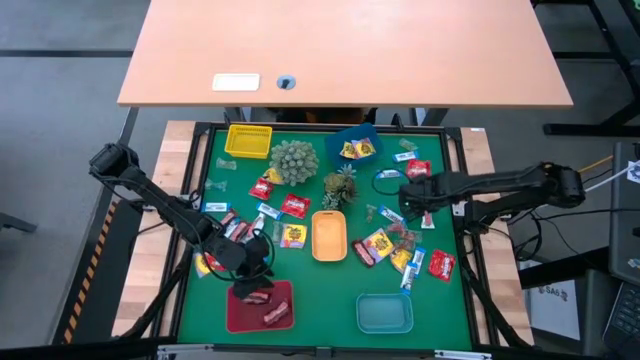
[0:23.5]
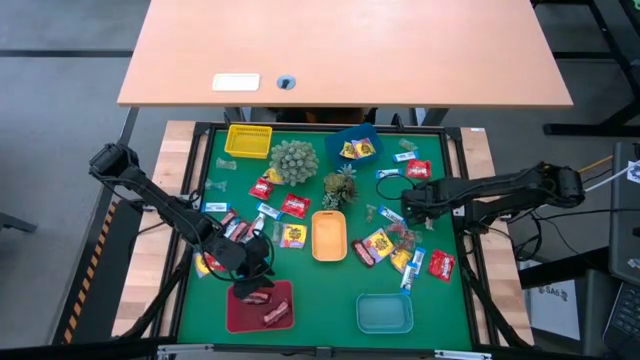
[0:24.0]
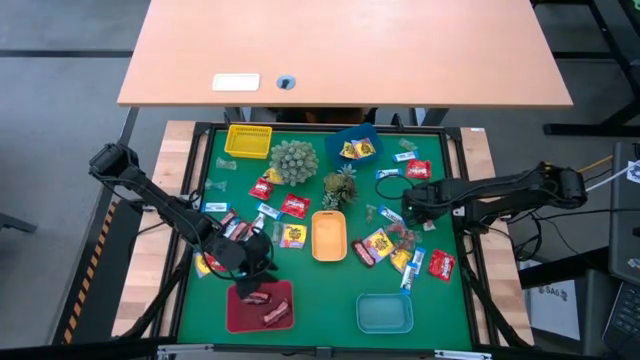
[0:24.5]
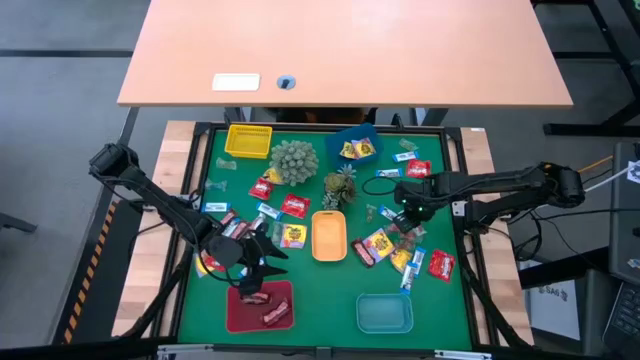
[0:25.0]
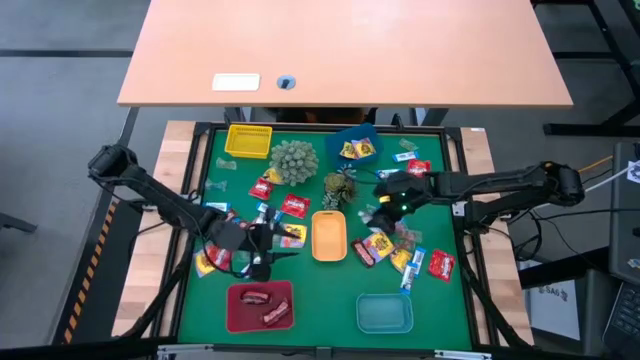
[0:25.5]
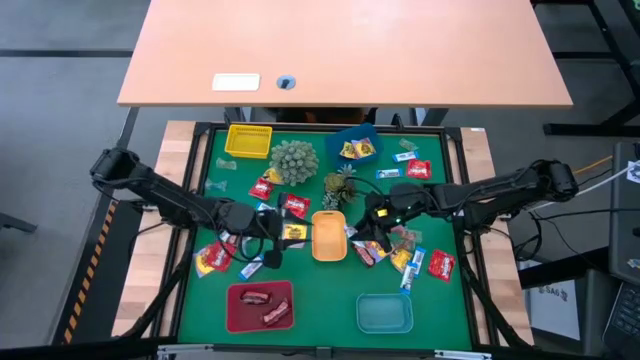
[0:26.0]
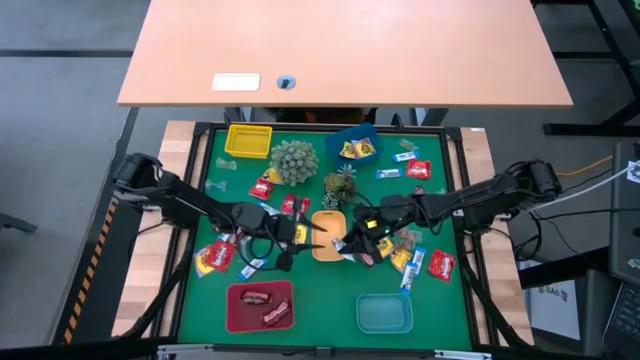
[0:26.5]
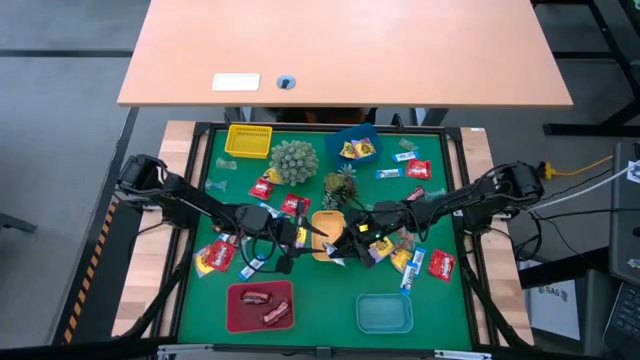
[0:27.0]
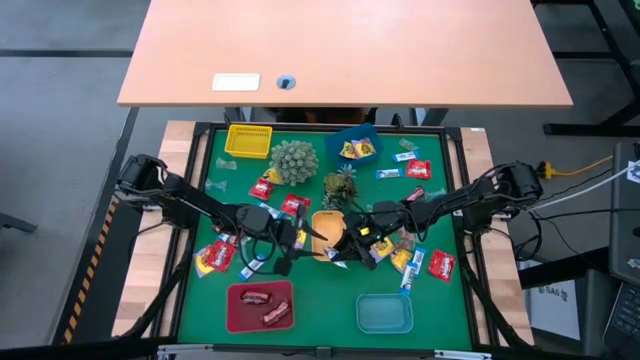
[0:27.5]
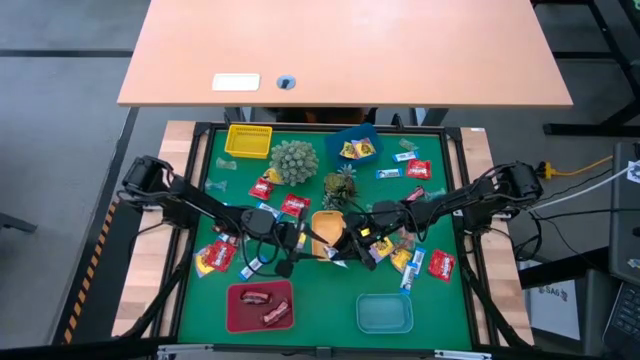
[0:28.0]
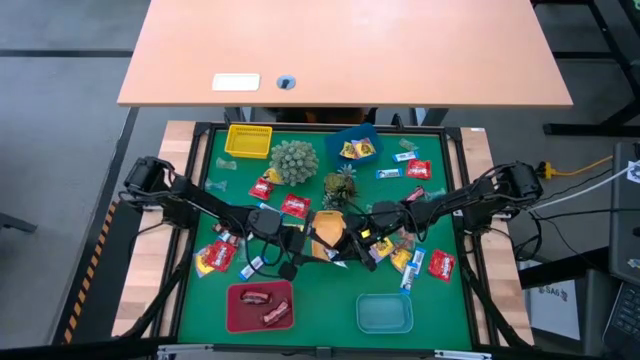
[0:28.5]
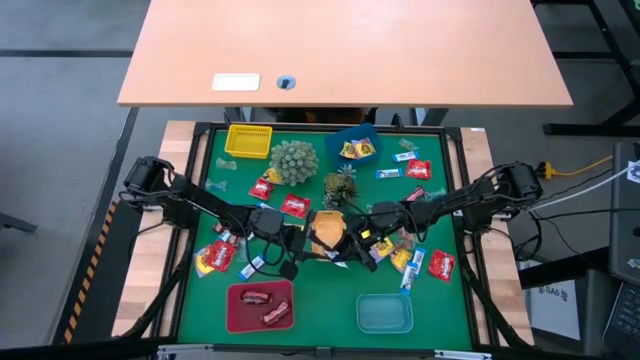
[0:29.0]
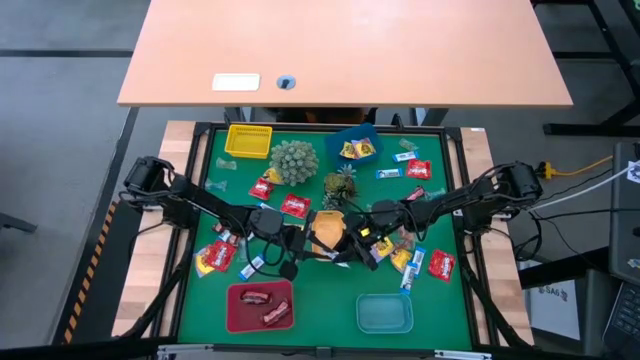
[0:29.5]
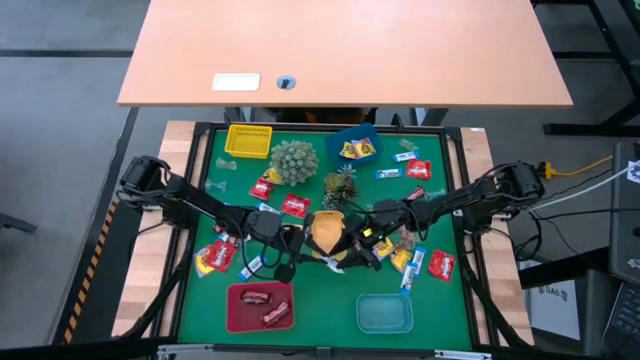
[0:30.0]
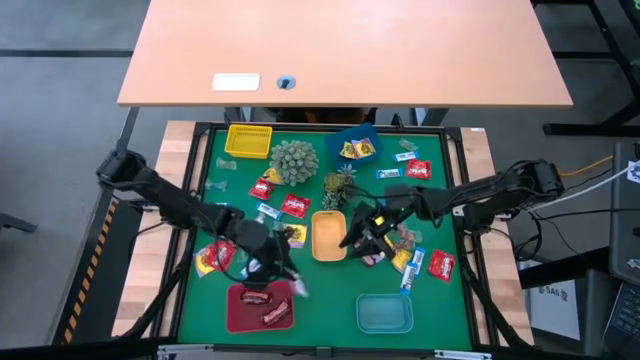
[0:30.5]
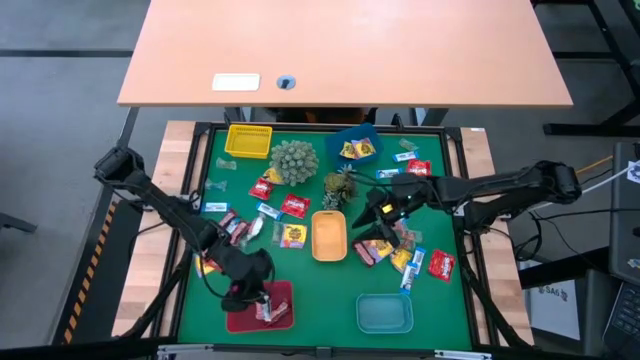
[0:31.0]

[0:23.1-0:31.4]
Task: Sort candy
Put the white chocolate bar into the red bin

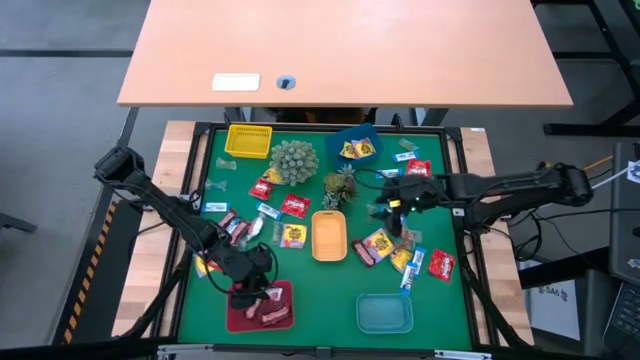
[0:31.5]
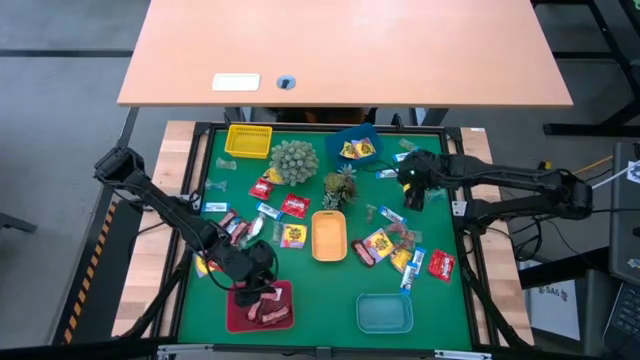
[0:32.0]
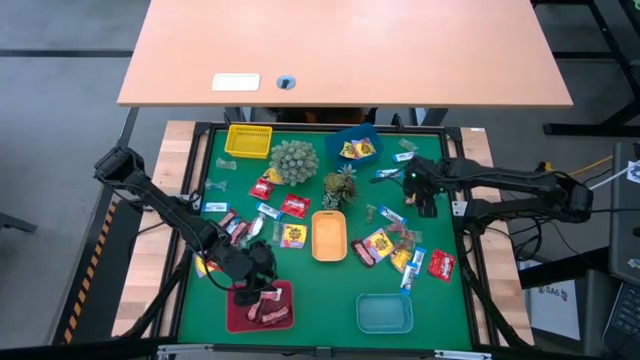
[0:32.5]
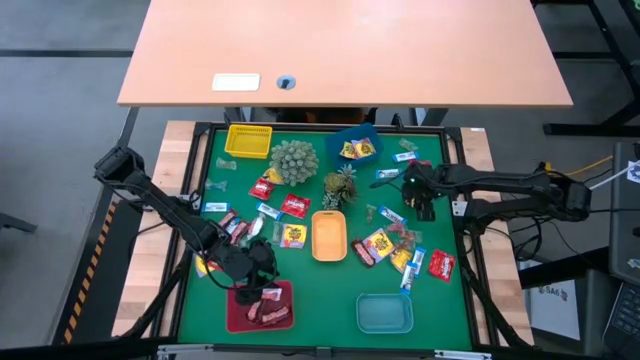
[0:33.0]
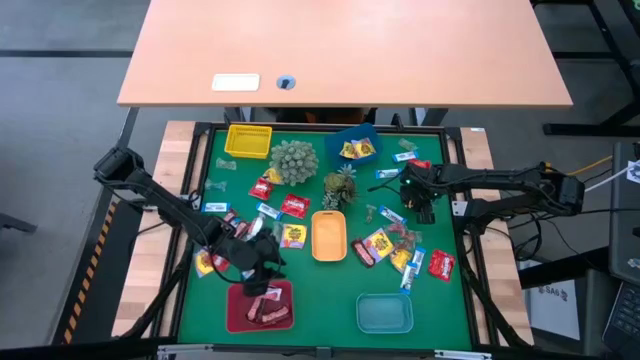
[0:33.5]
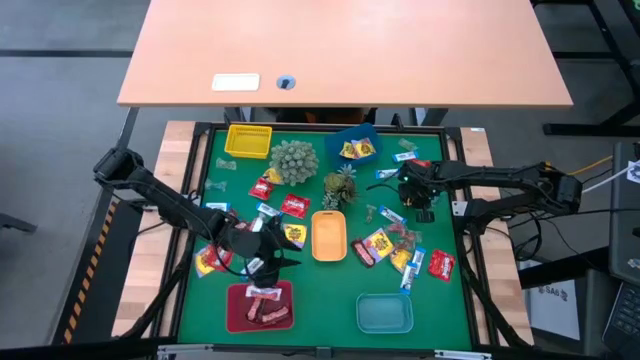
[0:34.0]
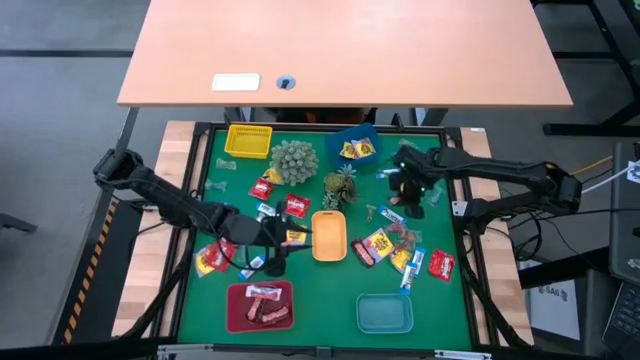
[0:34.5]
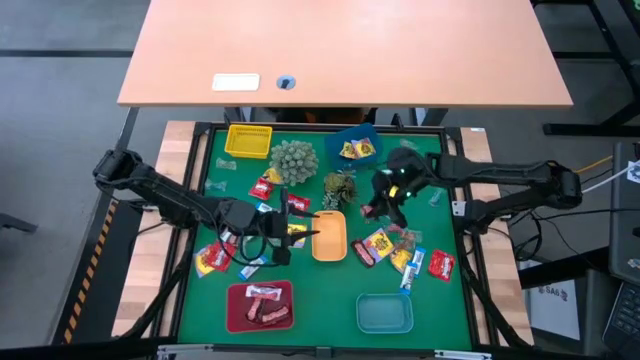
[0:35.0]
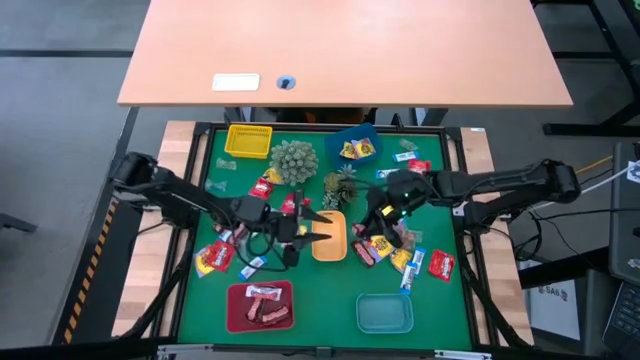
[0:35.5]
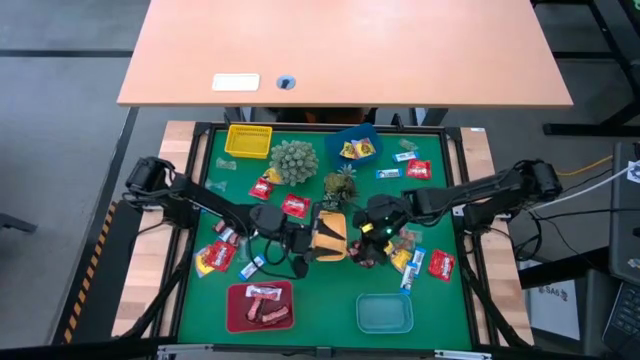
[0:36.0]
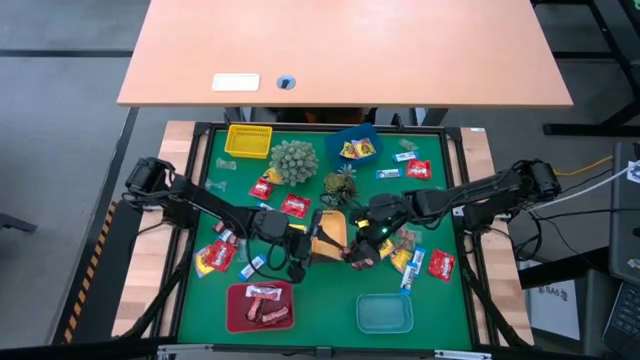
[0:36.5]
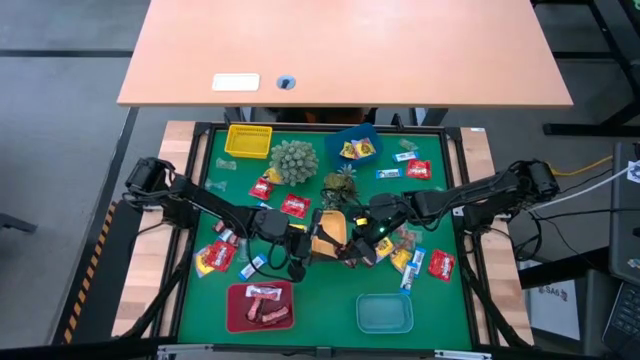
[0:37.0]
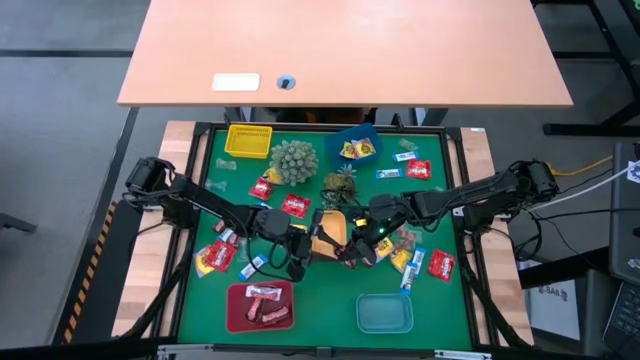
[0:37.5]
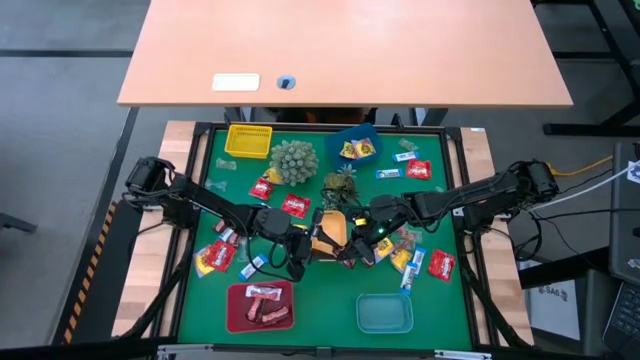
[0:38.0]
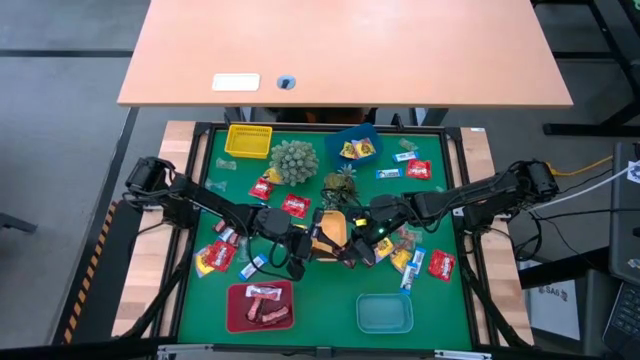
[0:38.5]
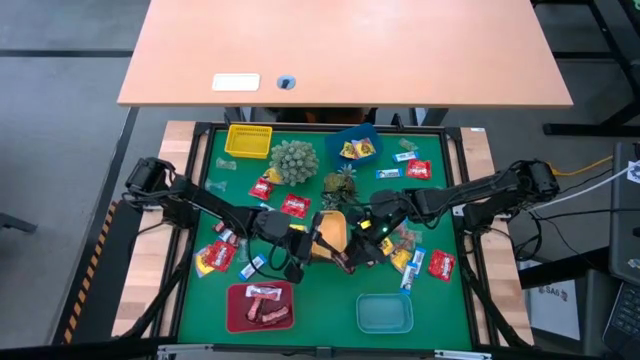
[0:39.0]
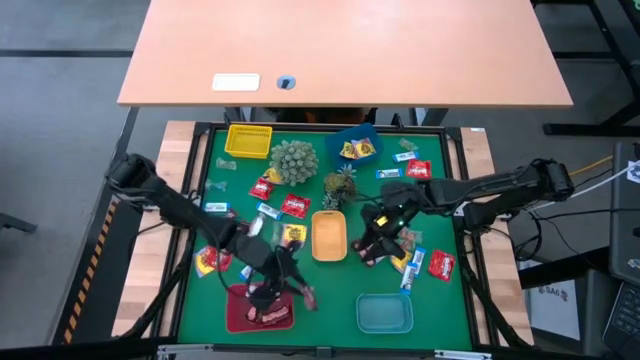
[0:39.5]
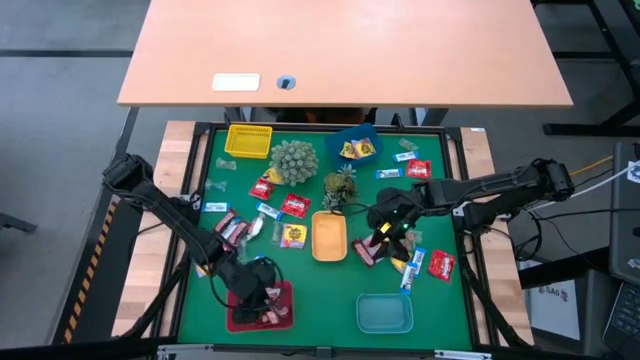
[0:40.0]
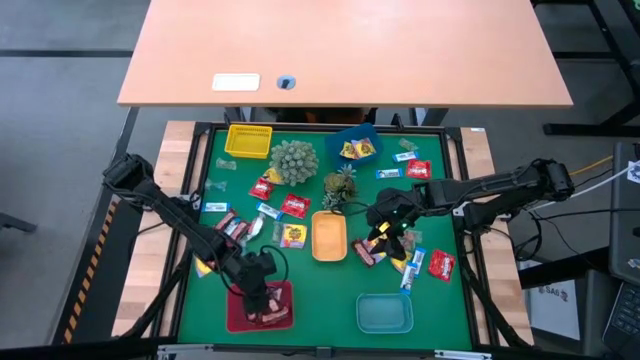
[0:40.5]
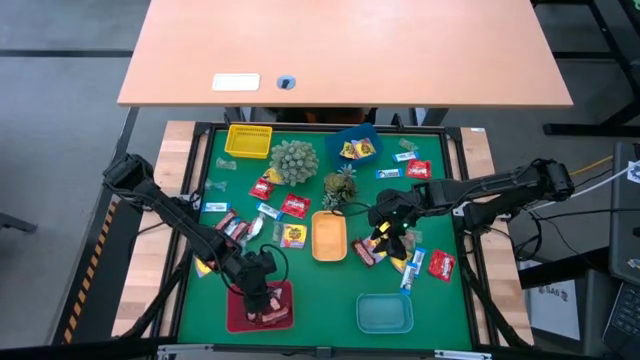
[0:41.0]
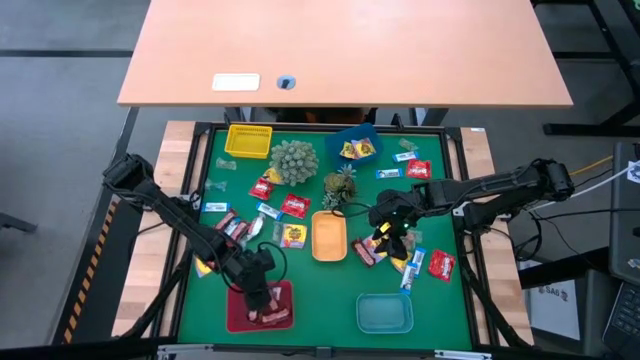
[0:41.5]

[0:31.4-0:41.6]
Put the brown chocolate bar into the red bin

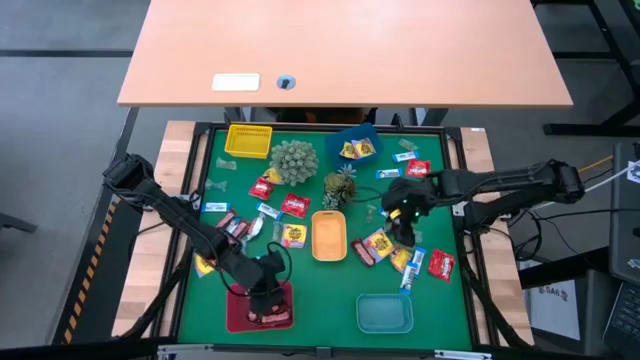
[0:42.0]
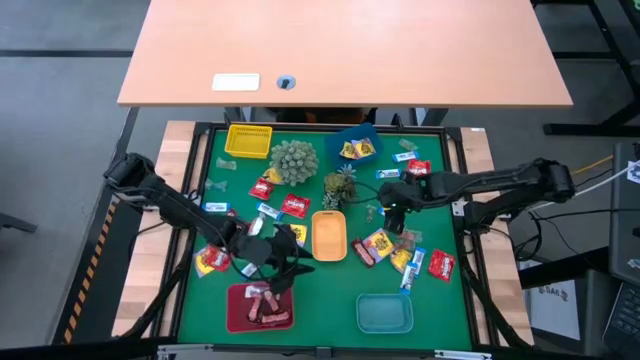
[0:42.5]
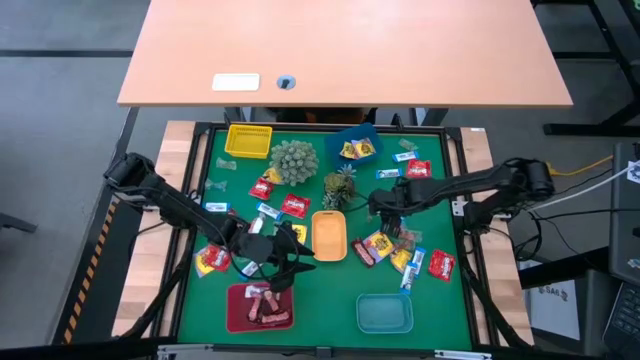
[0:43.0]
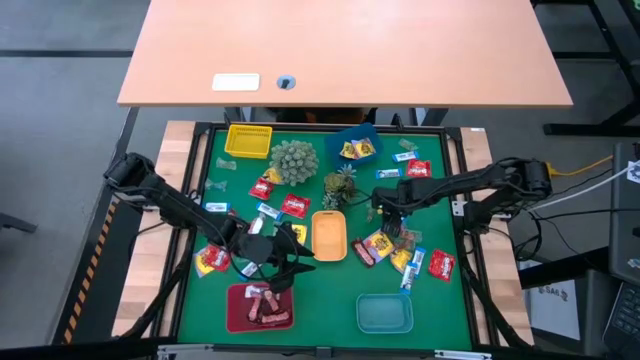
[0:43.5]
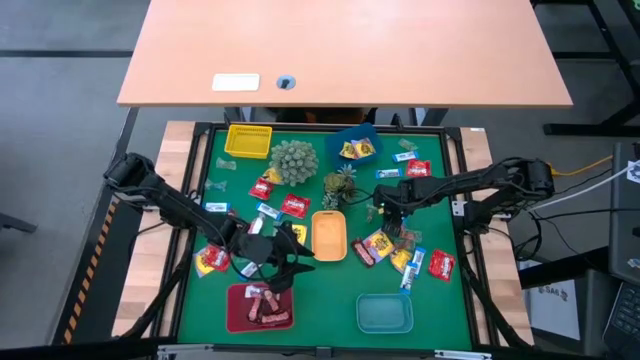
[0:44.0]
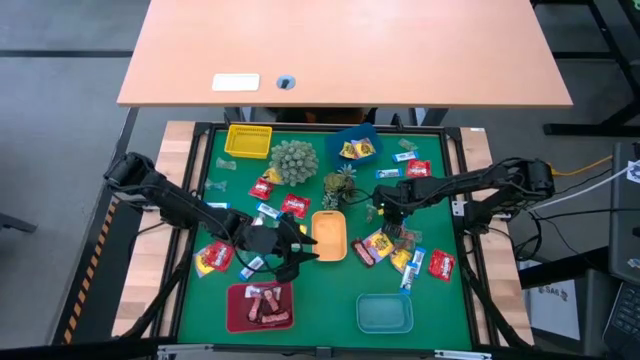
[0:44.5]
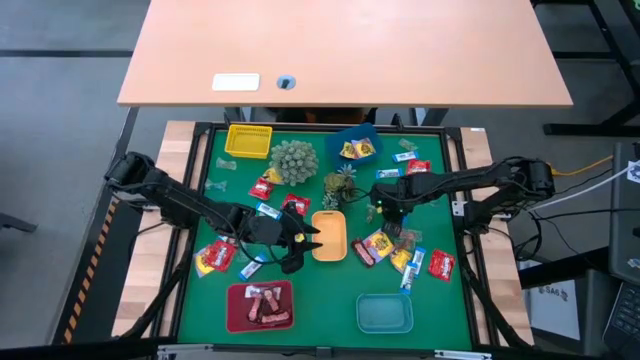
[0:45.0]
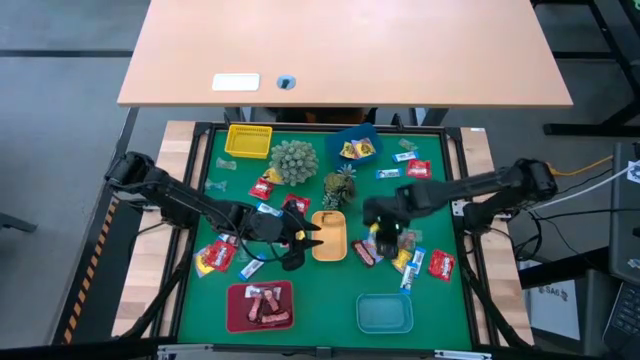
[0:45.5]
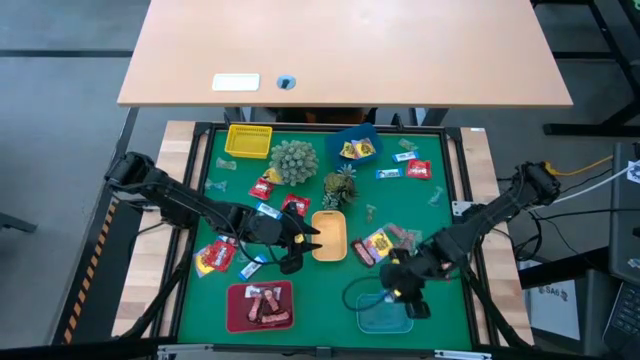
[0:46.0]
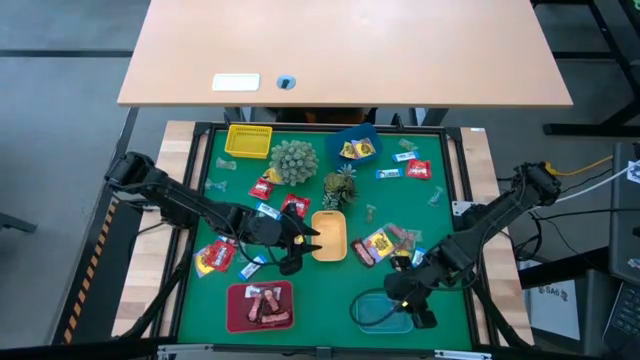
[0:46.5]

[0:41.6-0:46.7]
Put the blue chocolate bar into the light blue bin
